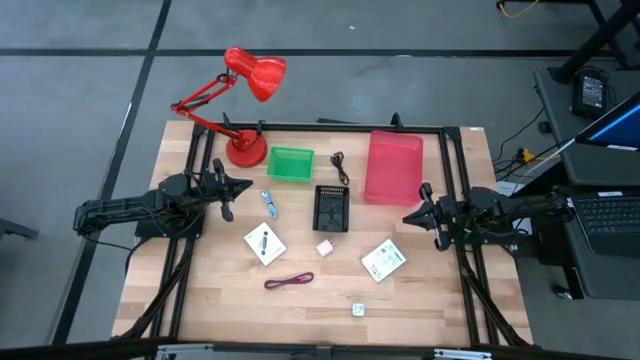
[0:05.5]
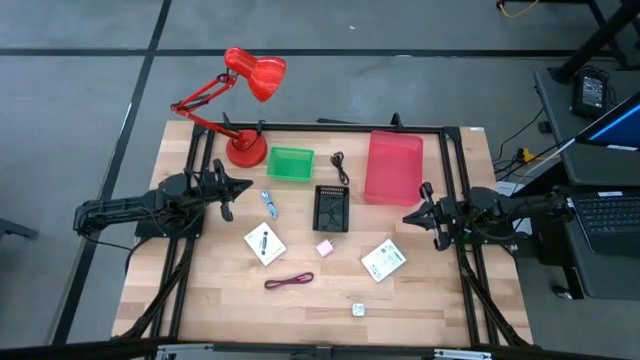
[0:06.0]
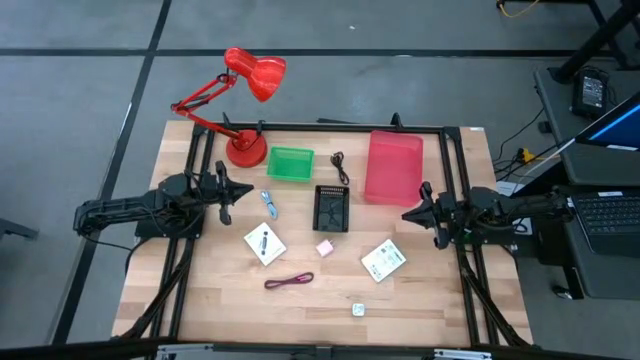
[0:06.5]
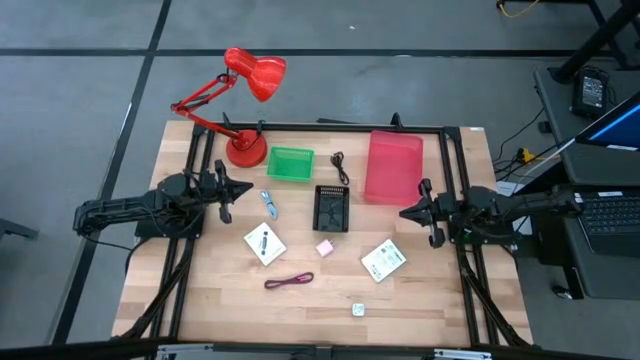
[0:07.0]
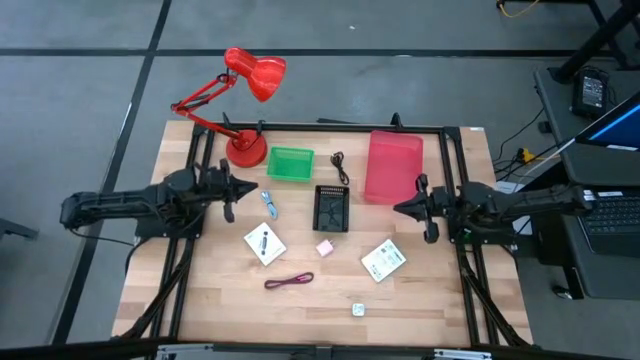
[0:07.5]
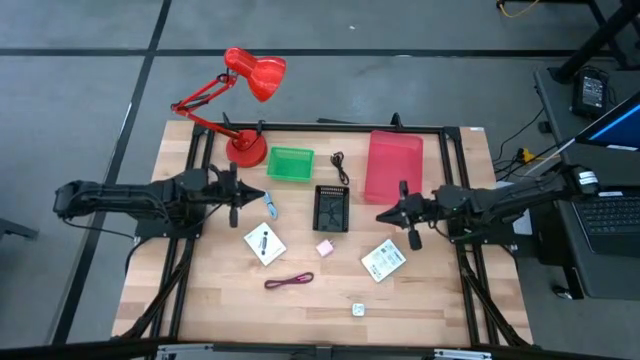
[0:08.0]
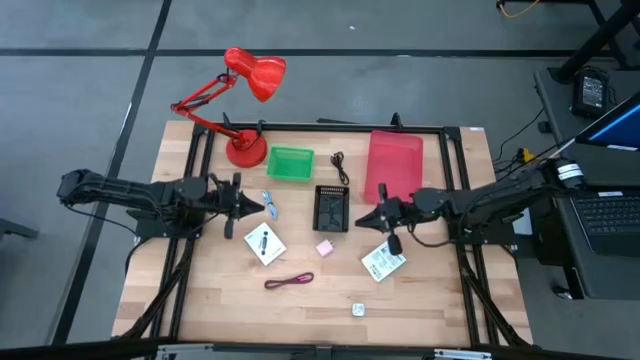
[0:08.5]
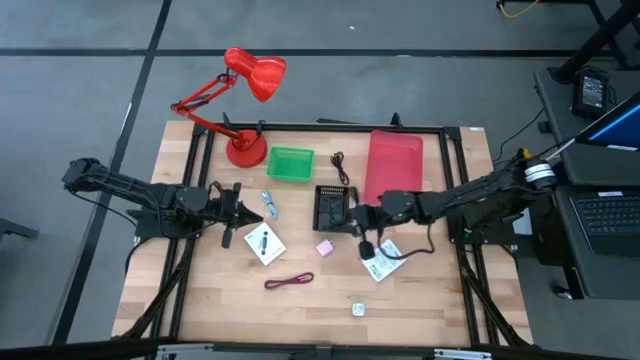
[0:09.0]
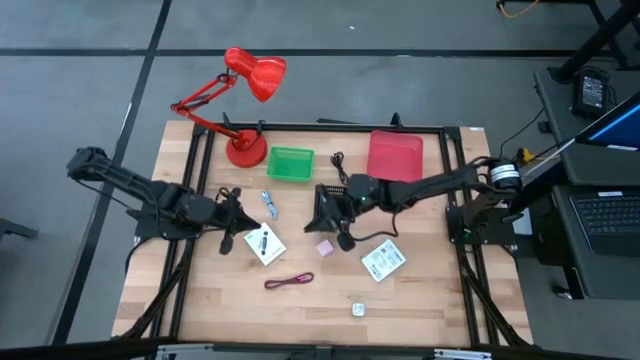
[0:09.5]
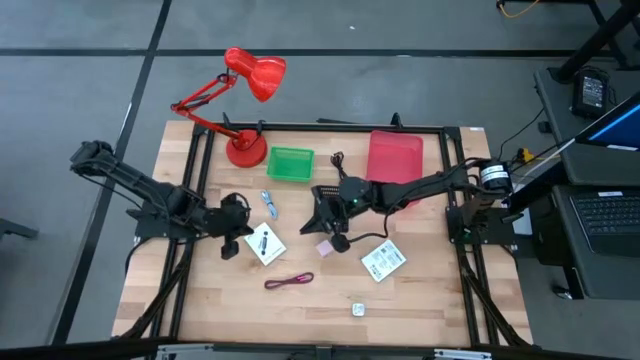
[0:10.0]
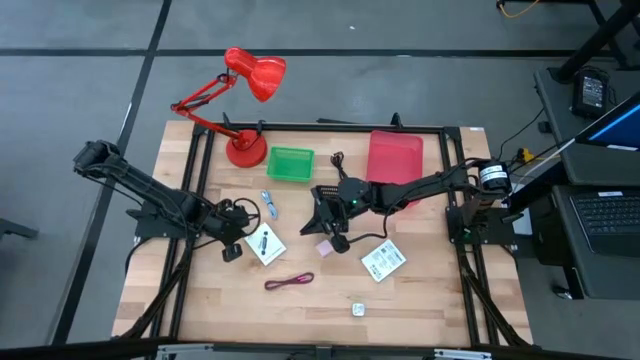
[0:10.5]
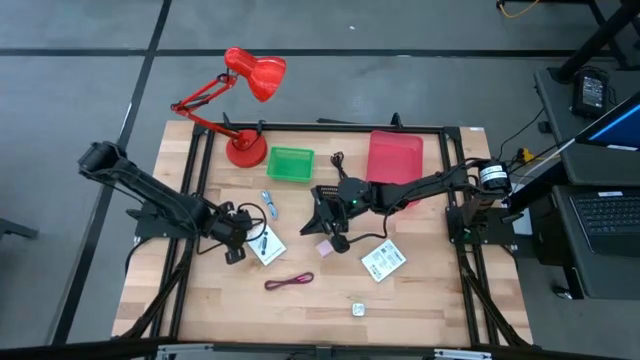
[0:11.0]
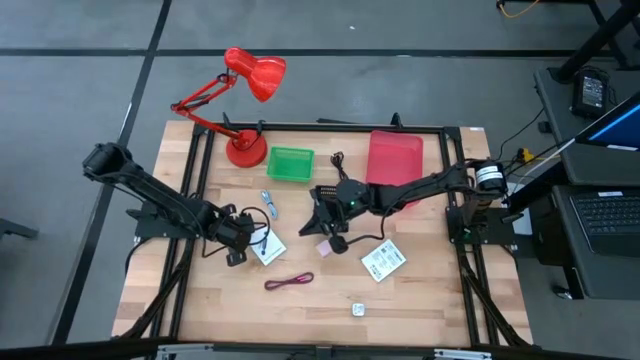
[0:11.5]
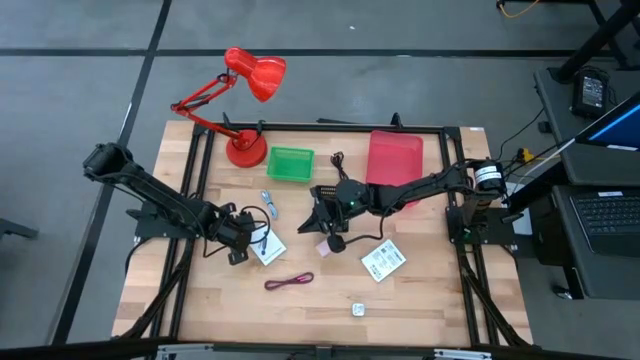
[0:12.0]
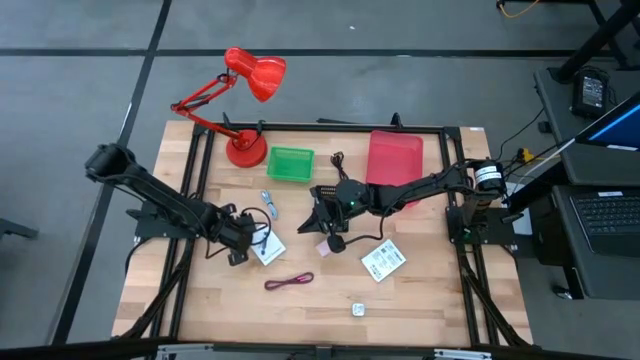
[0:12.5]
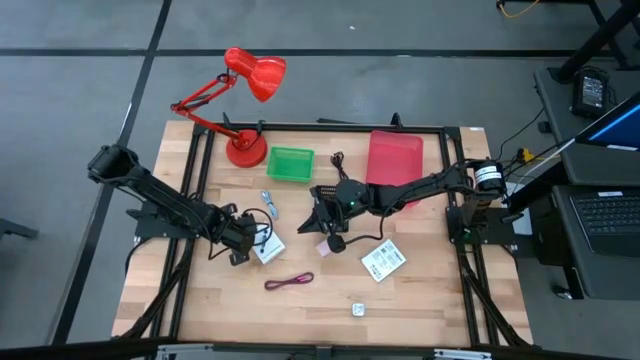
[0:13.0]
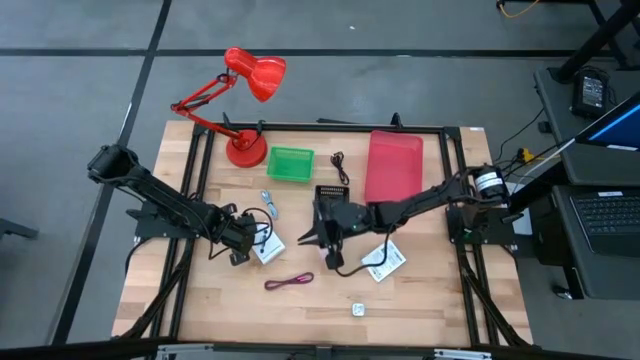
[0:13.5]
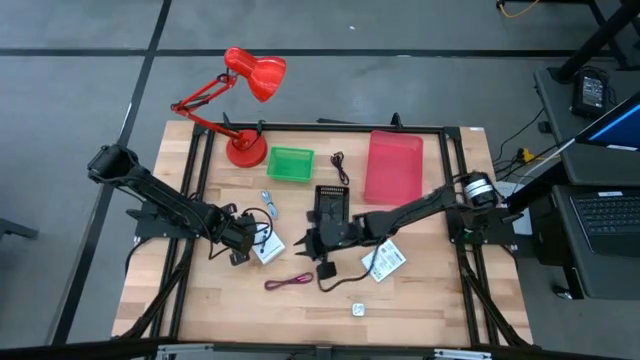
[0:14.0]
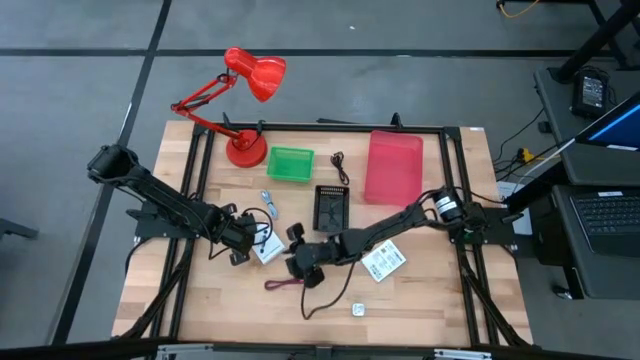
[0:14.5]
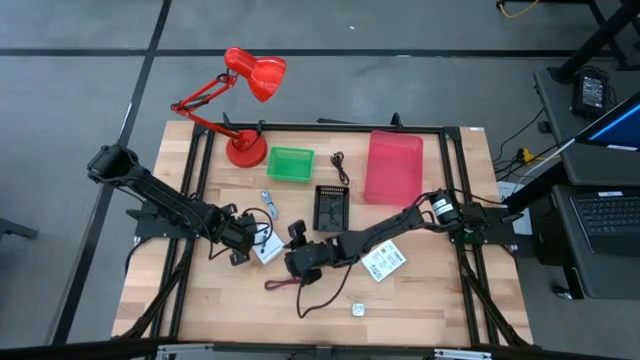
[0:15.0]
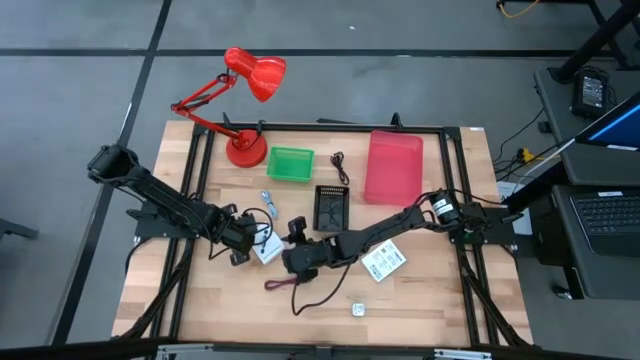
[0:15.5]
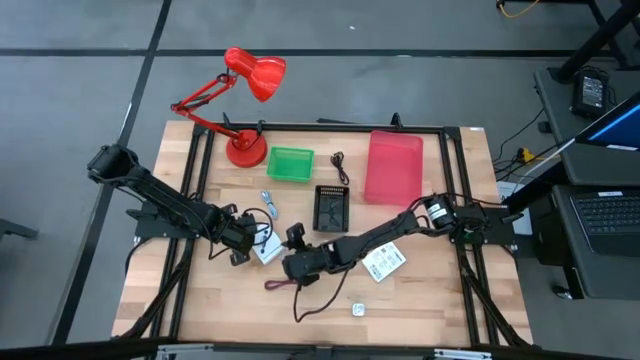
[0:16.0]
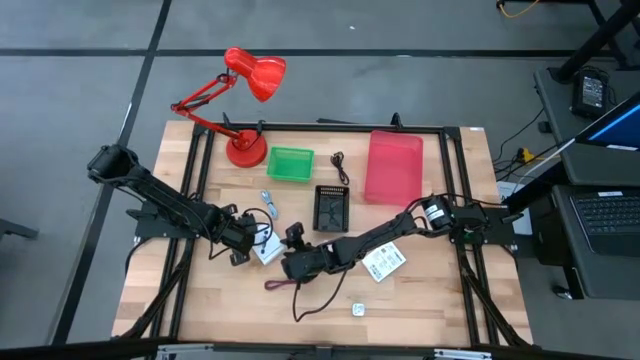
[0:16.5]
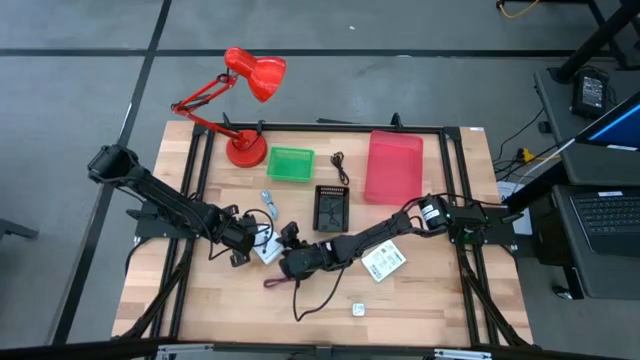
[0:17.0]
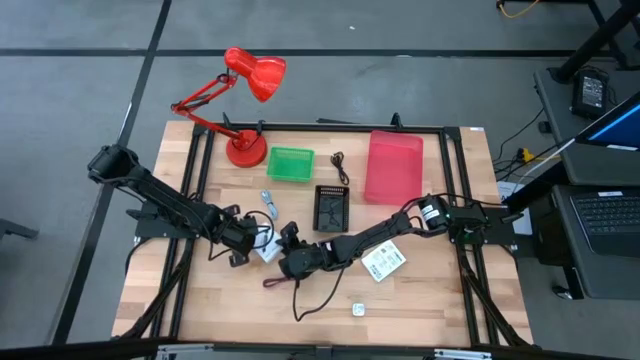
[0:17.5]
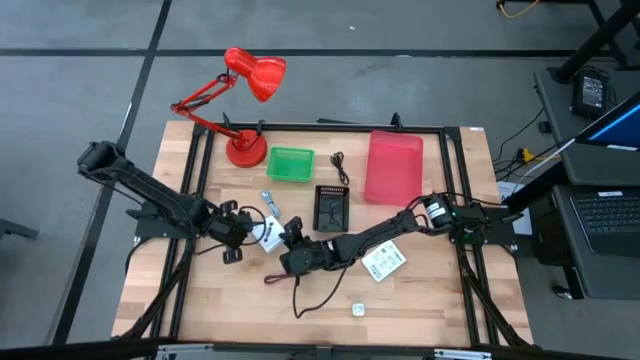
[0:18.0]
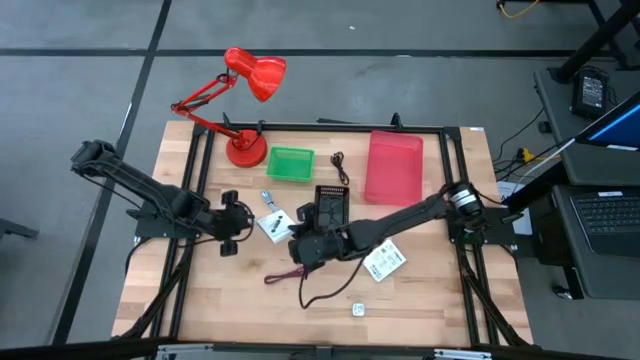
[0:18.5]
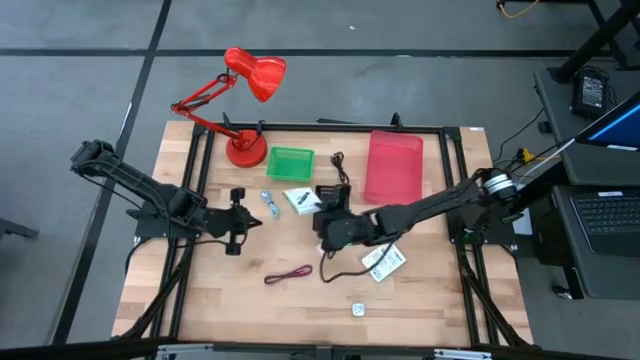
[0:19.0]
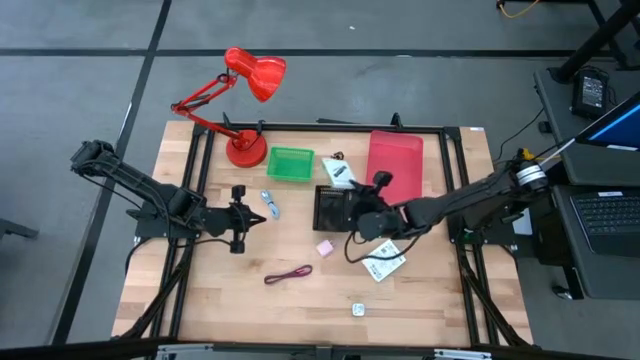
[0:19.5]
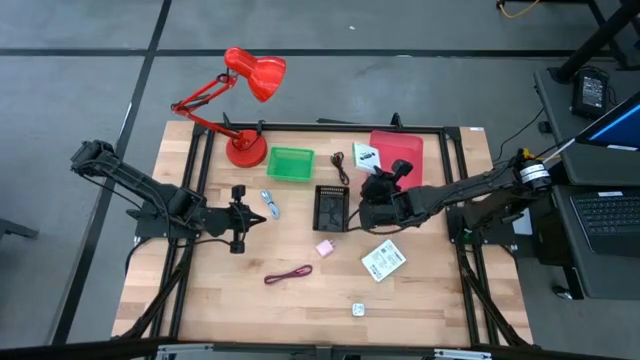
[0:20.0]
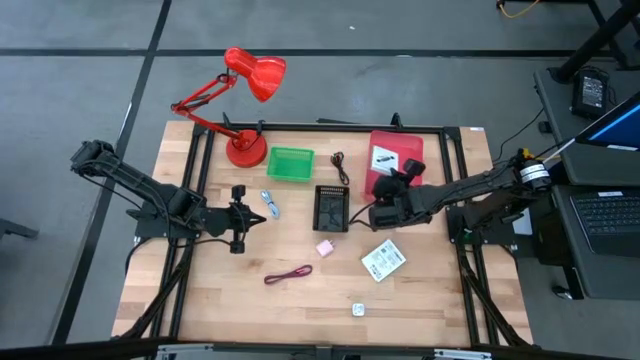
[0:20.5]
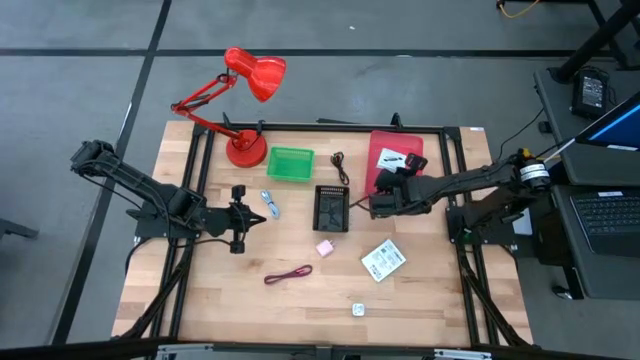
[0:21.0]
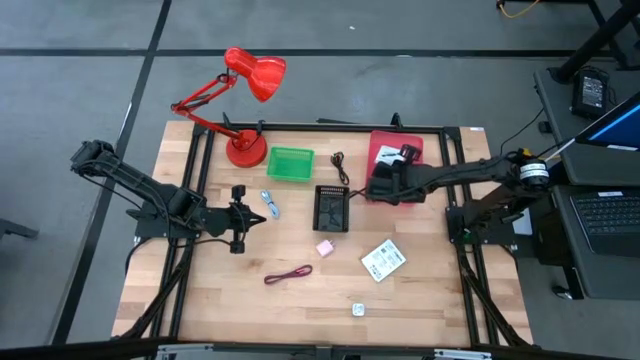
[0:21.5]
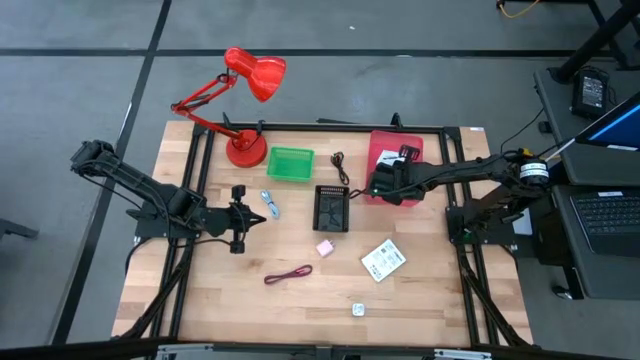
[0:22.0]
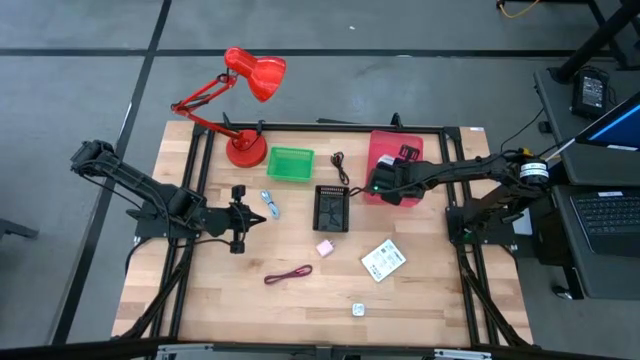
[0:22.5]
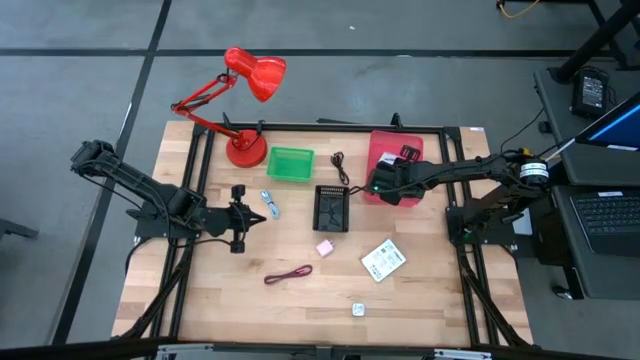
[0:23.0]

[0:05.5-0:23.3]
Task: Pick and place items into bin
Put the left white card reader box into the pink bin
